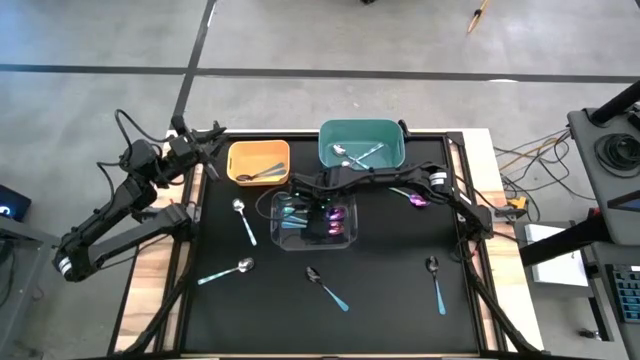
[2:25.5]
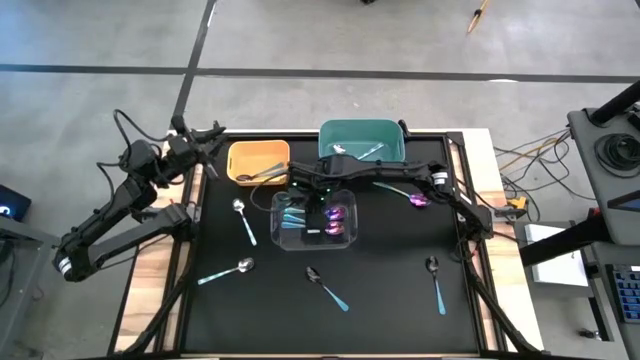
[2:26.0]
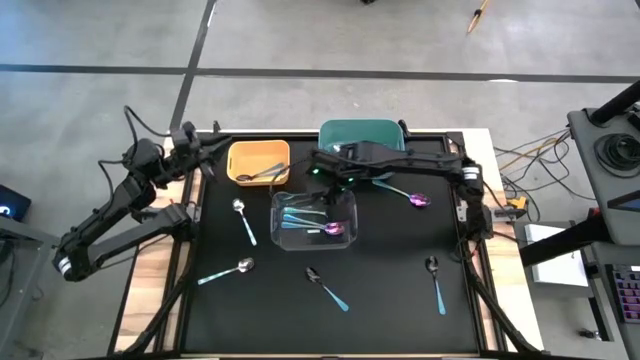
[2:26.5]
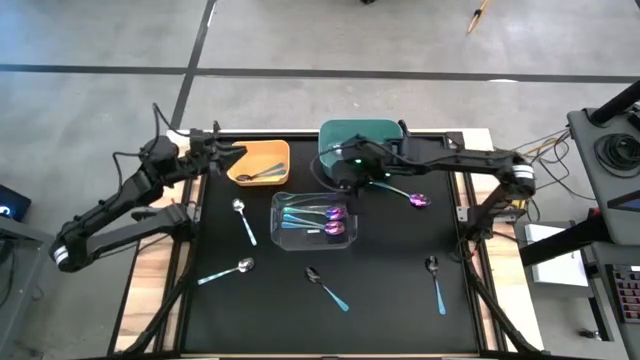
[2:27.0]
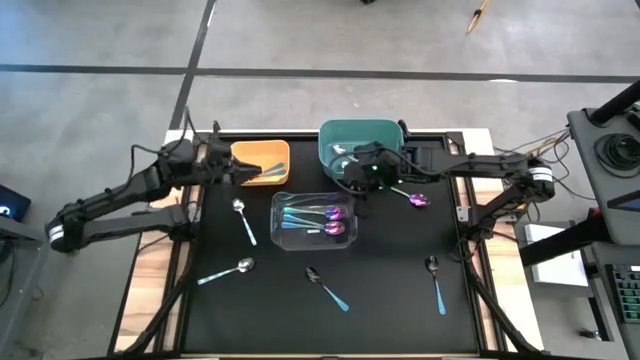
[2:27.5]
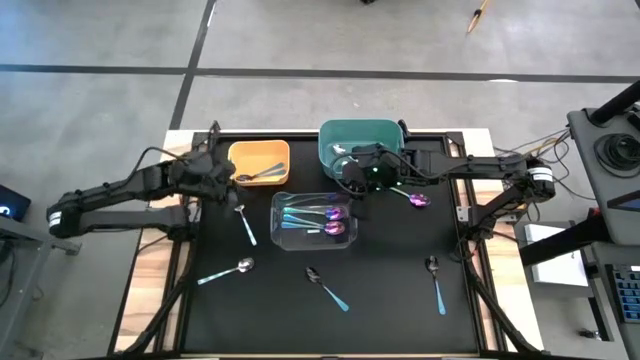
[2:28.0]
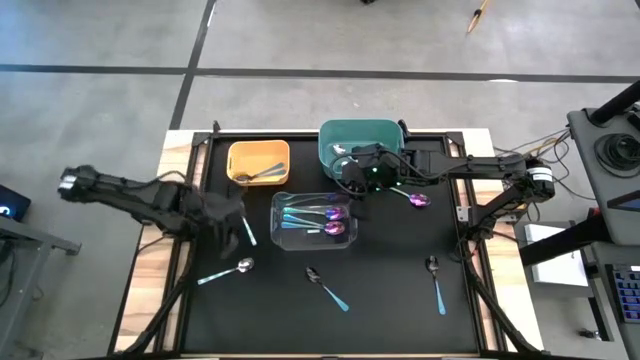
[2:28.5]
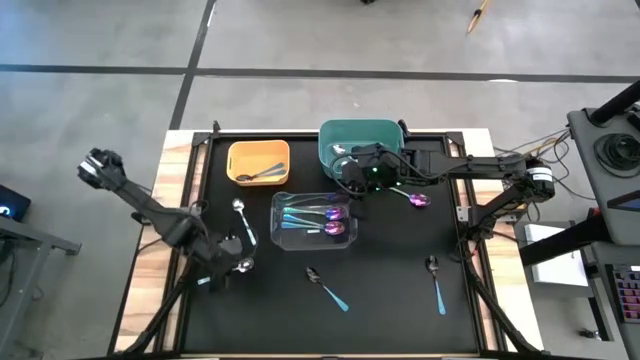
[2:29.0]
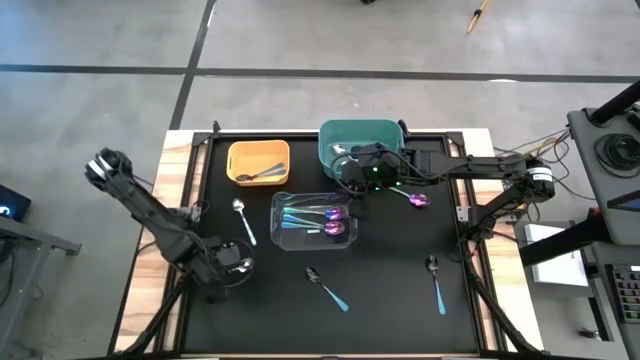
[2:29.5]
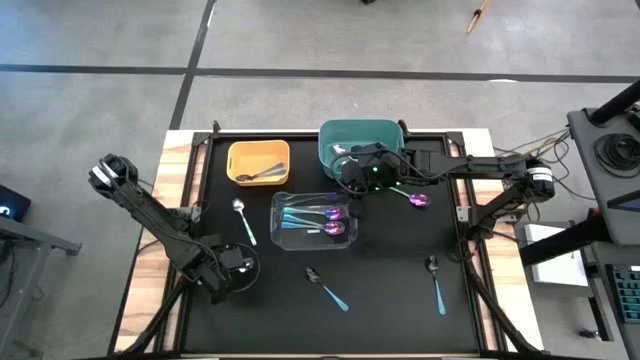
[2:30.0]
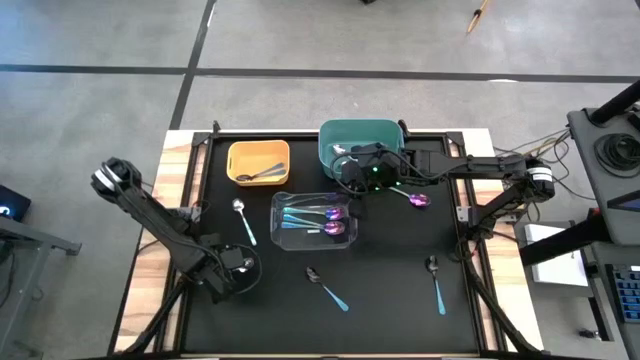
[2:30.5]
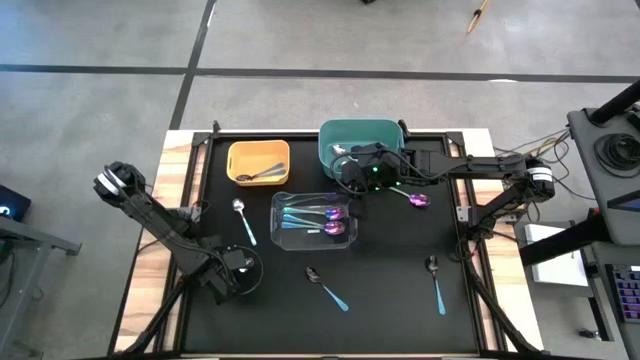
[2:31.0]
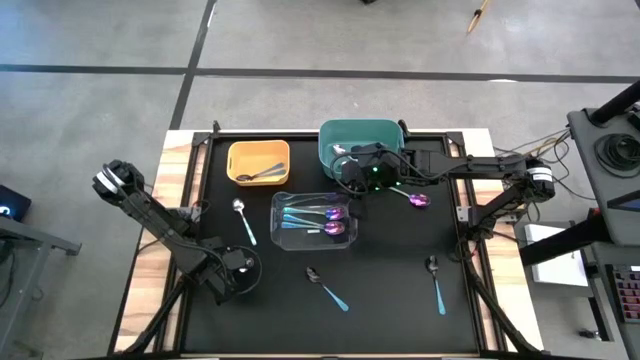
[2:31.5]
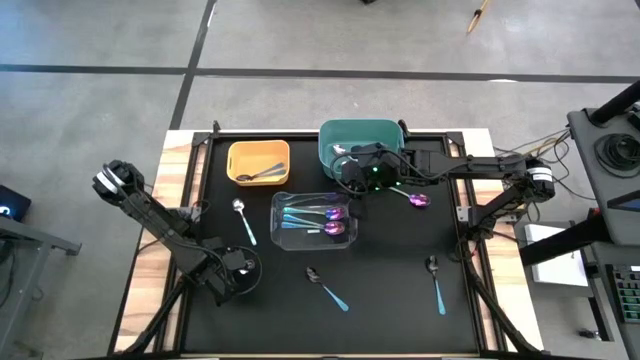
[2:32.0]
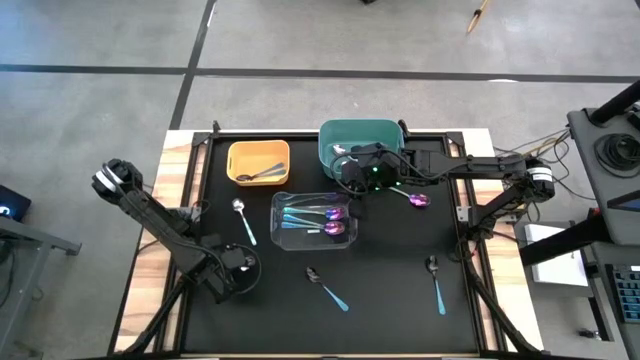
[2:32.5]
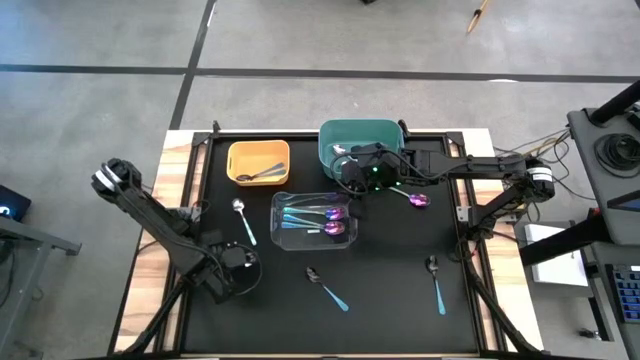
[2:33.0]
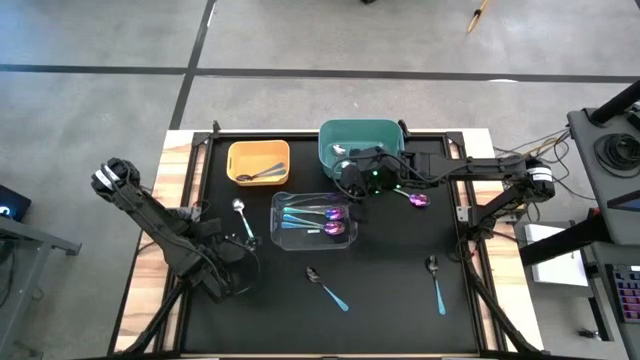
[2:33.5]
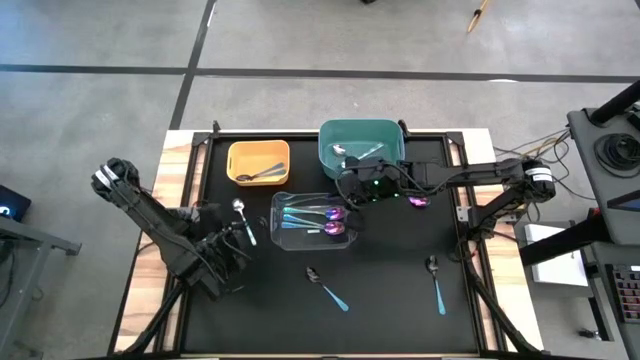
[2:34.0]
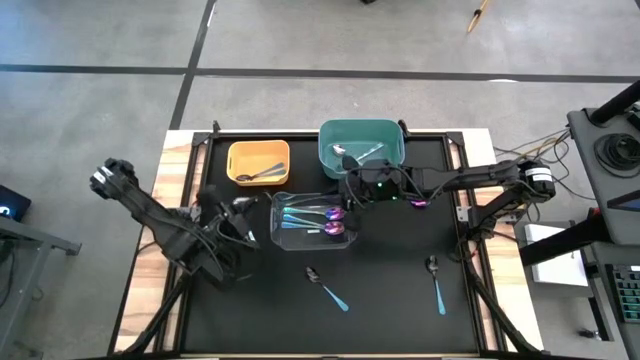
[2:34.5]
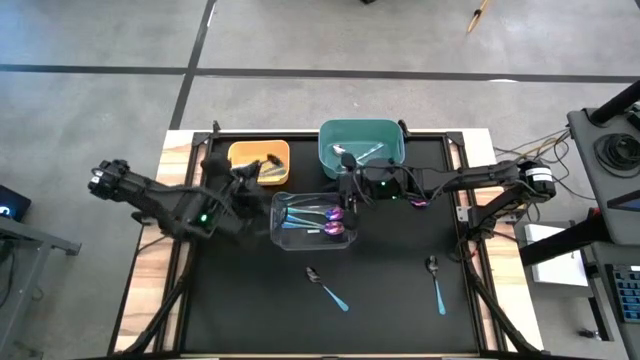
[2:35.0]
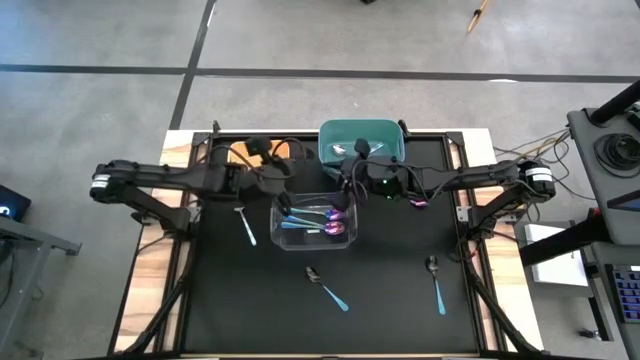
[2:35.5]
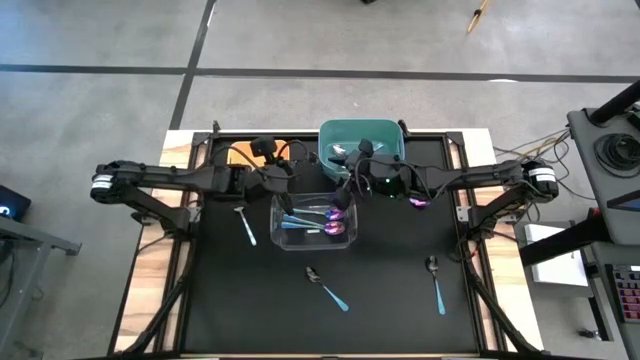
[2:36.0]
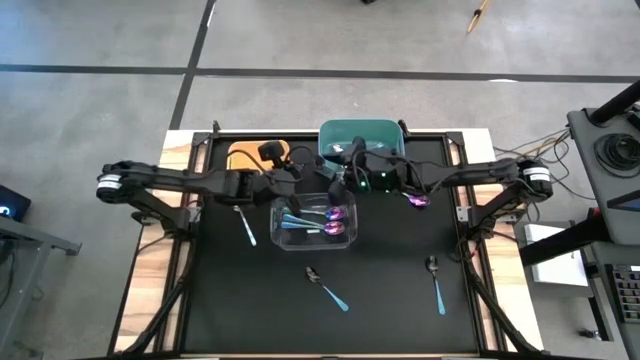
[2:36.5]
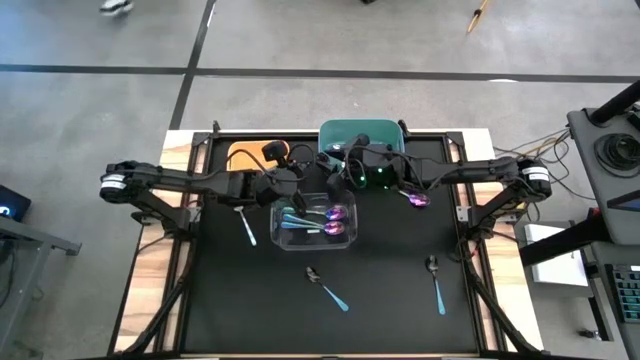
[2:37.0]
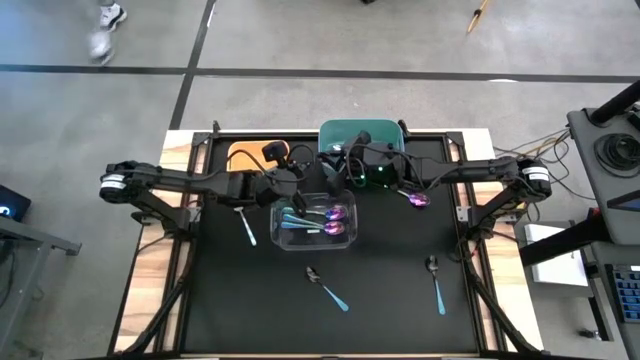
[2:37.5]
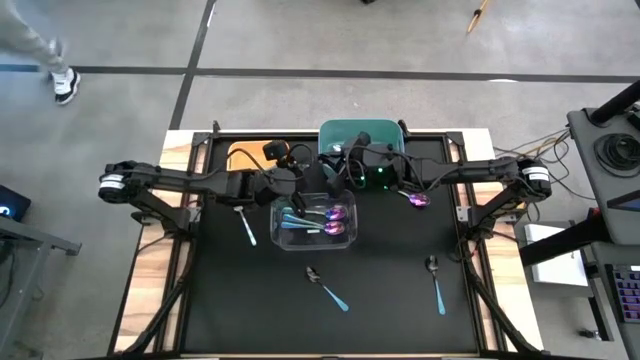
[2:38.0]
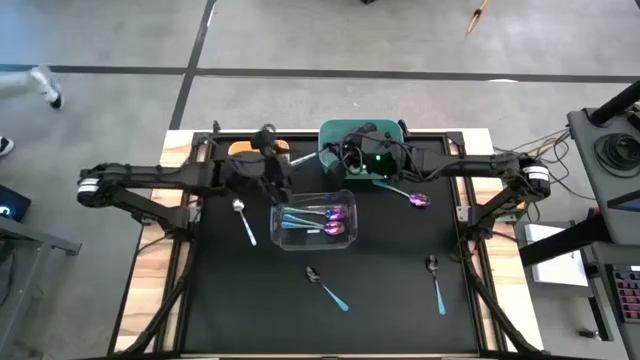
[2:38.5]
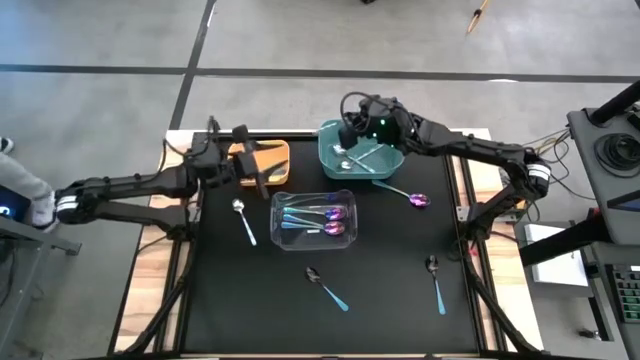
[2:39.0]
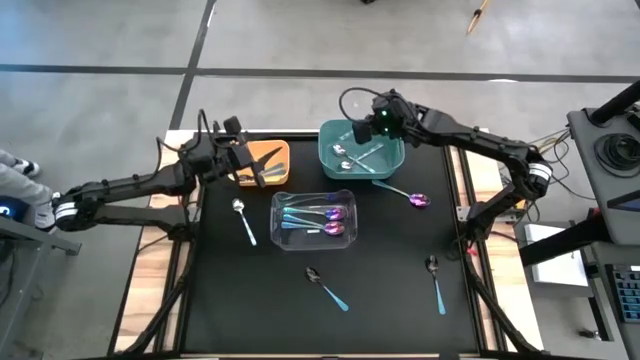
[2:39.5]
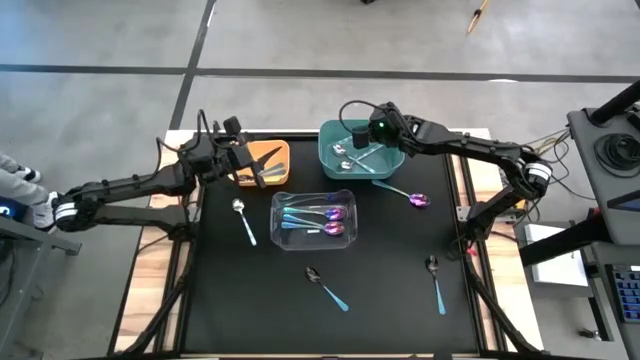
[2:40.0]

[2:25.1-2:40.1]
Task: Sort silverware by color (type)
Put the blue patterned spoon into the green bin

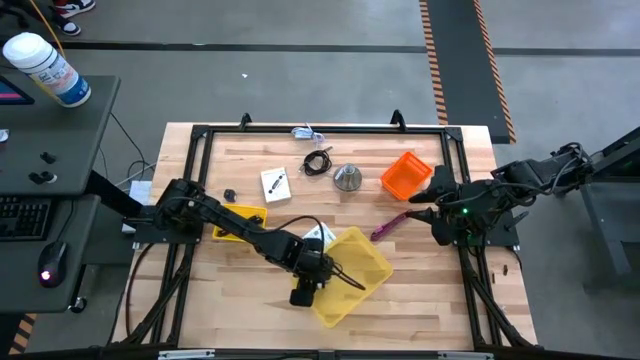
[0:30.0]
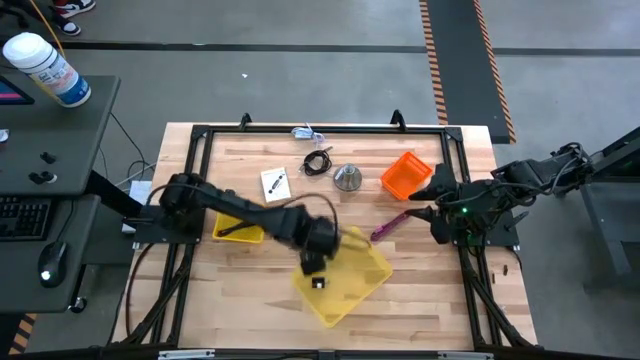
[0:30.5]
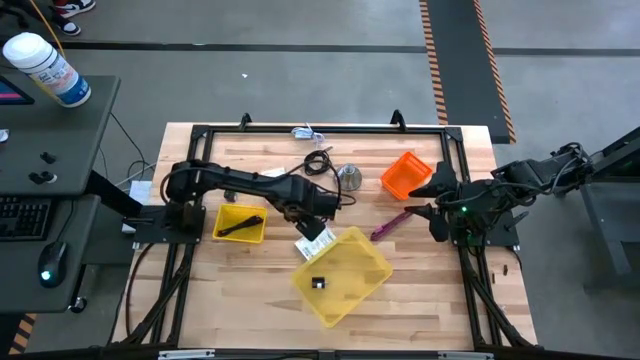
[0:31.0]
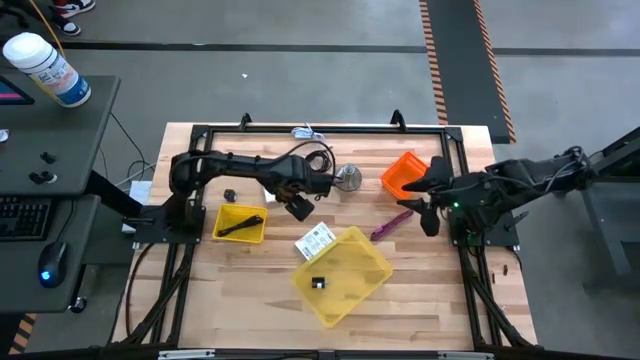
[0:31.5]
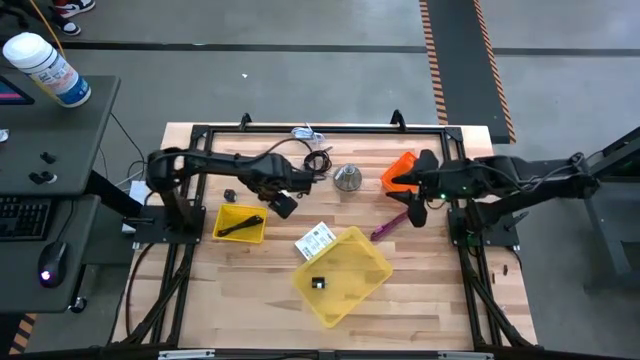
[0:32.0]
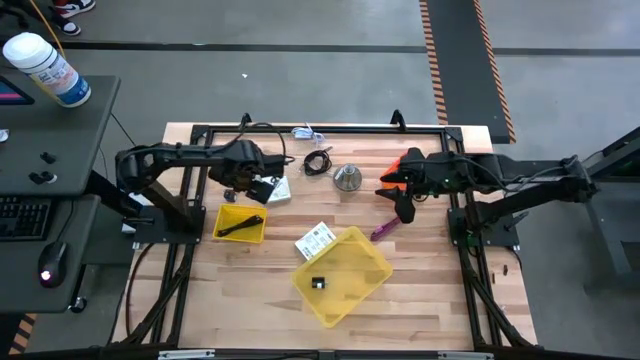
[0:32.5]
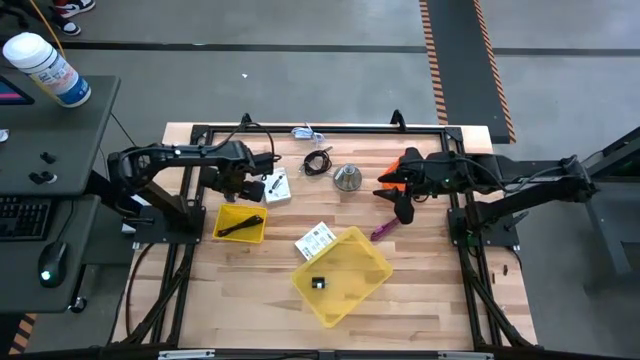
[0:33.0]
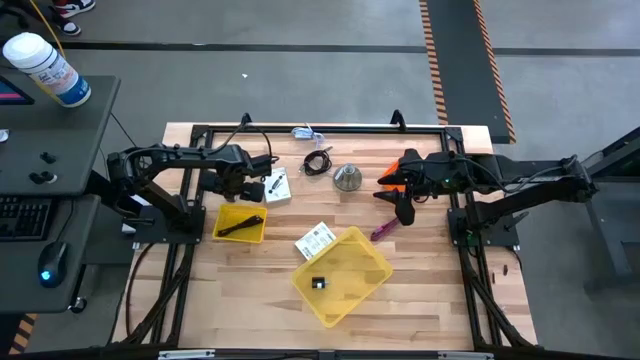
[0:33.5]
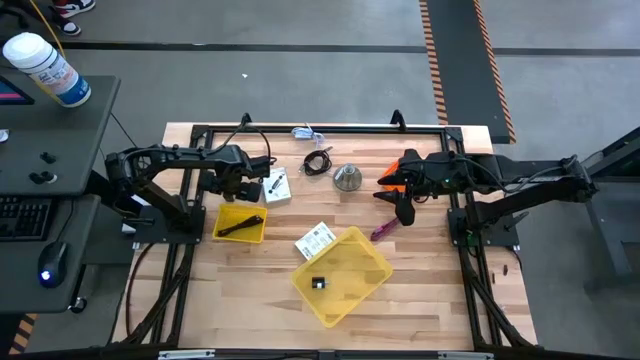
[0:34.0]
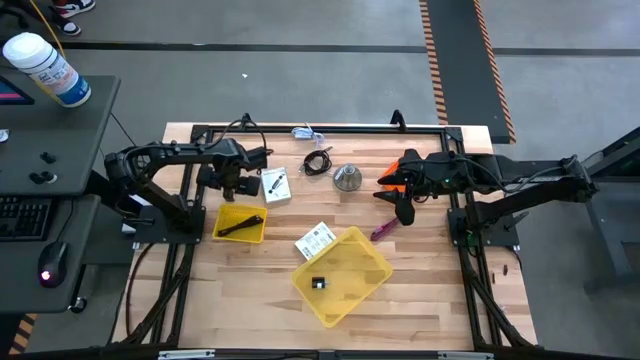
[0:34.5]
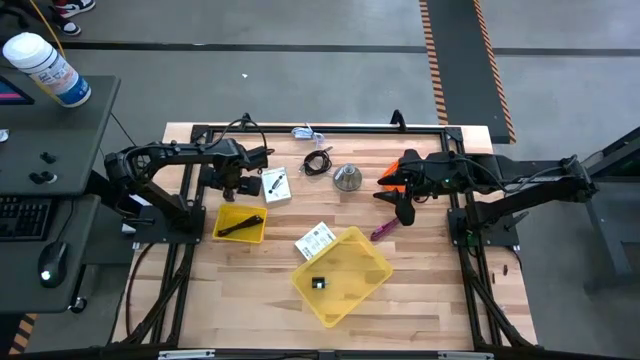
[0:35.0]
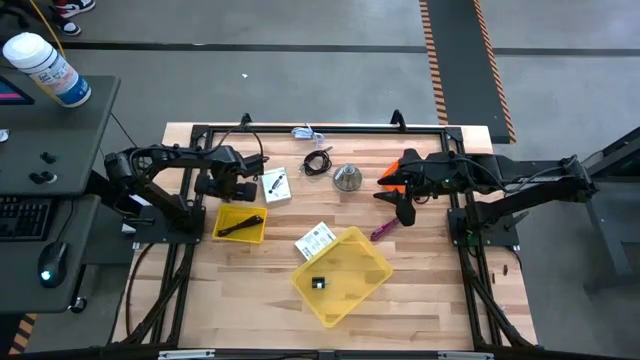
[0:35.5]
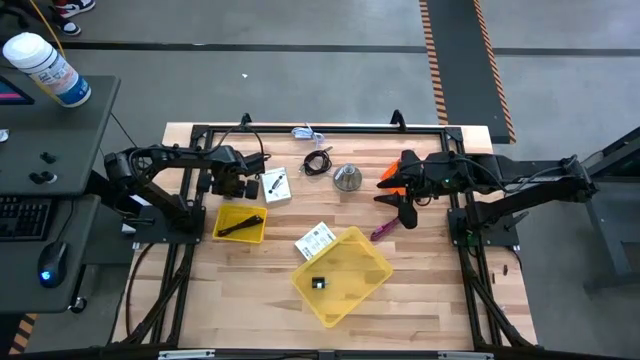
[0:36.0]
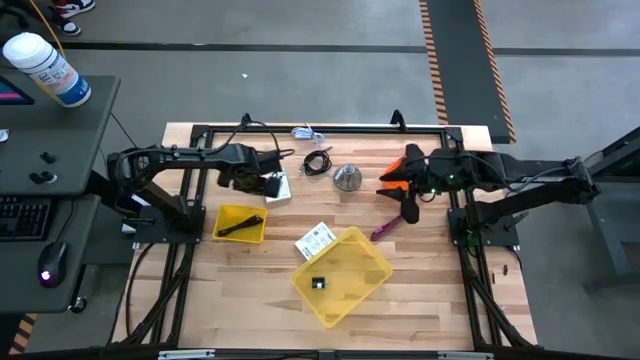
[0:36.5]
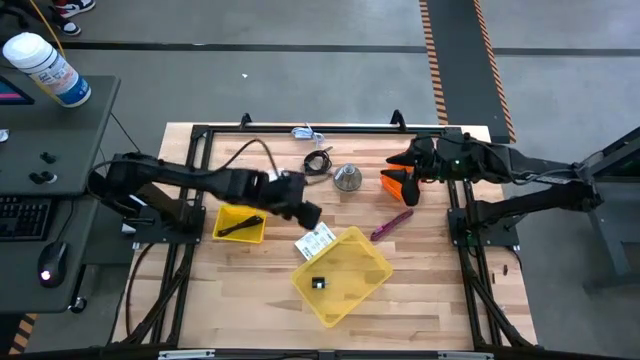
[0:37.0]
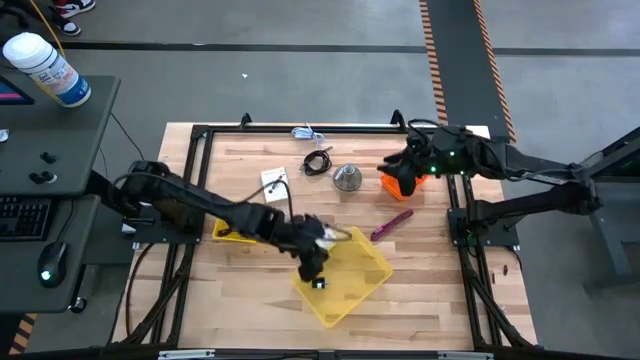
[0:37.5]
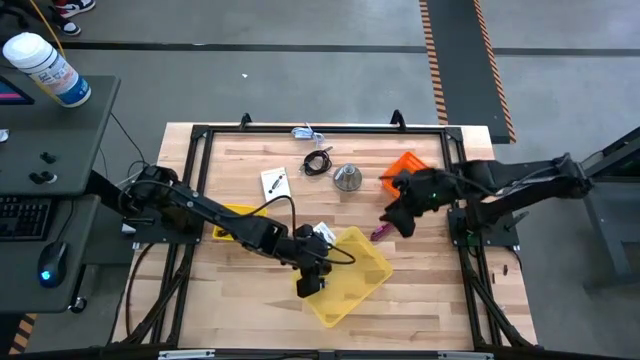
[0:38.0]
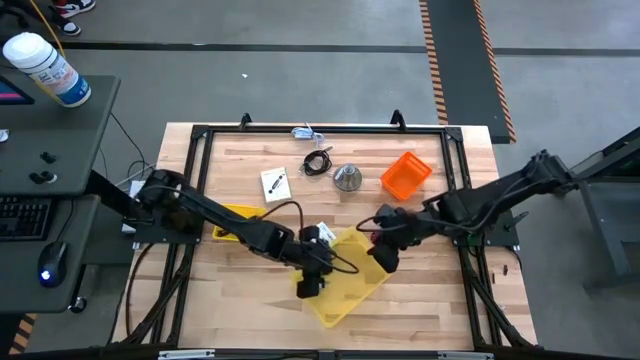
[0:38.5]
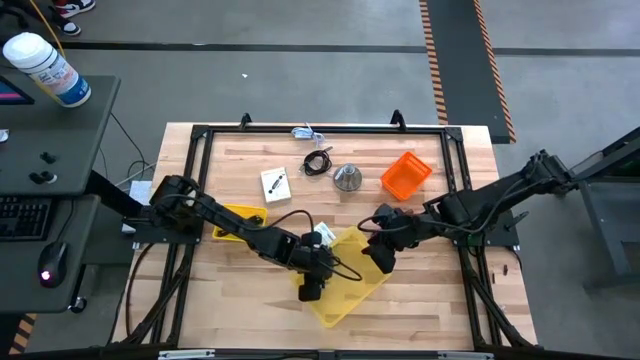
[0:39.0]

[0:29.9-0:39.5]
Task: Pick and place items into bin
Put the black charger adapter into the right yellow bin
